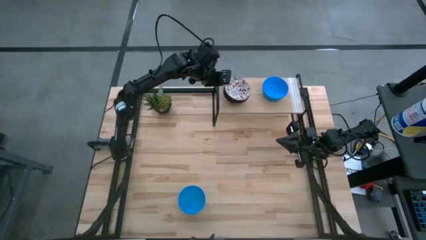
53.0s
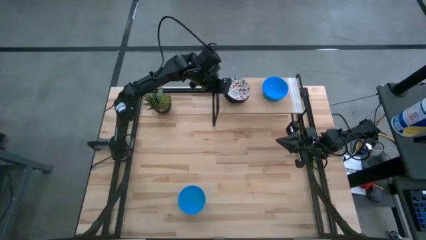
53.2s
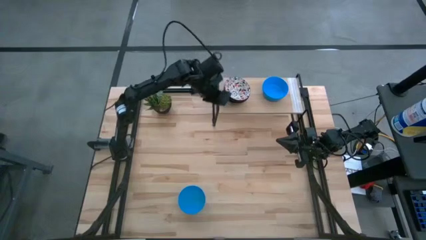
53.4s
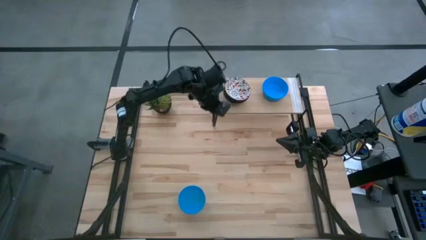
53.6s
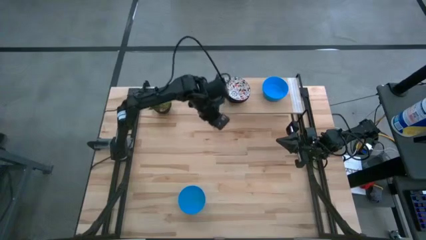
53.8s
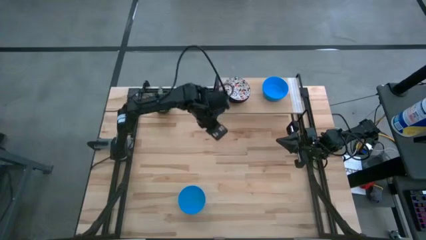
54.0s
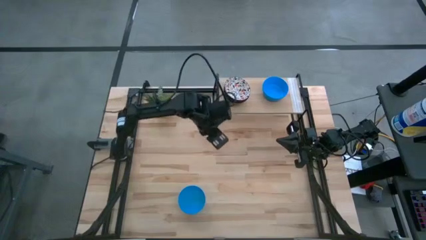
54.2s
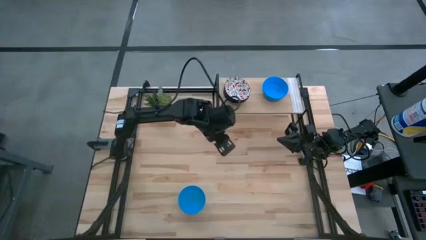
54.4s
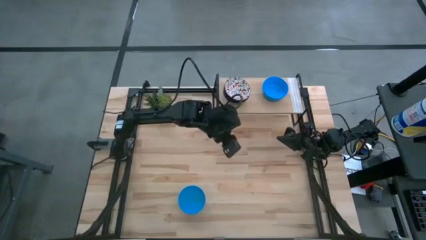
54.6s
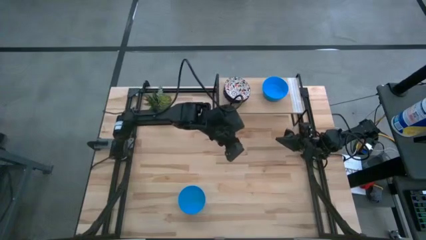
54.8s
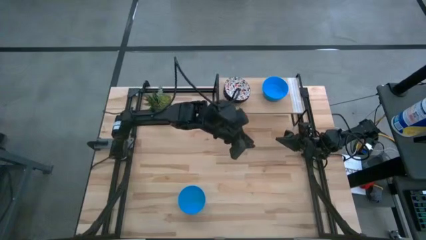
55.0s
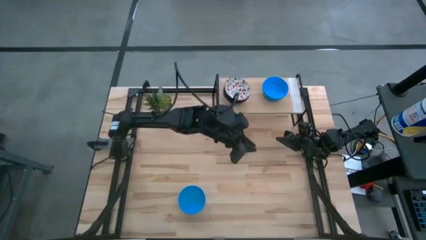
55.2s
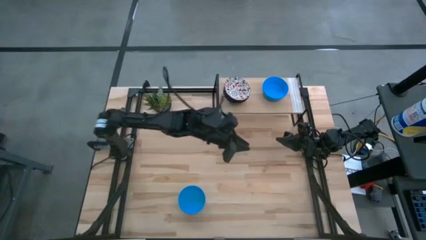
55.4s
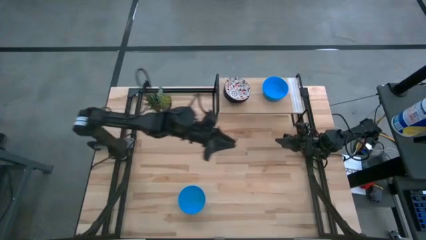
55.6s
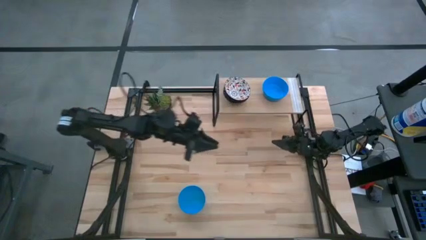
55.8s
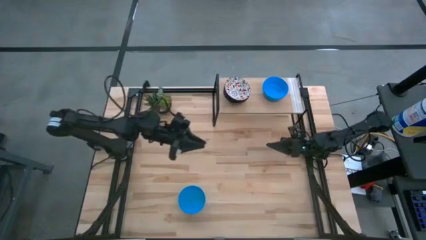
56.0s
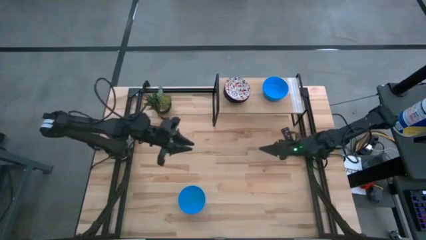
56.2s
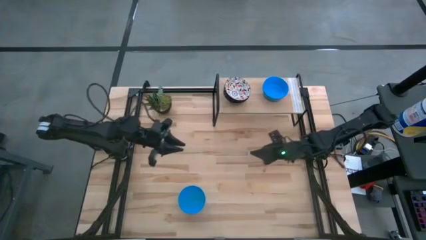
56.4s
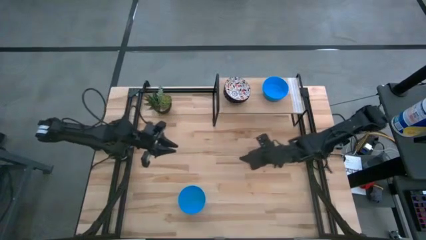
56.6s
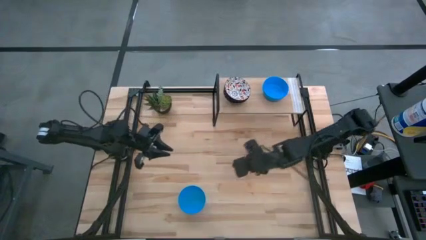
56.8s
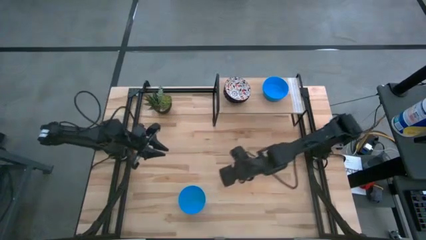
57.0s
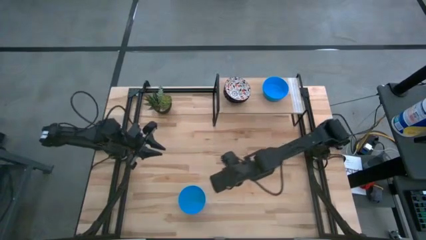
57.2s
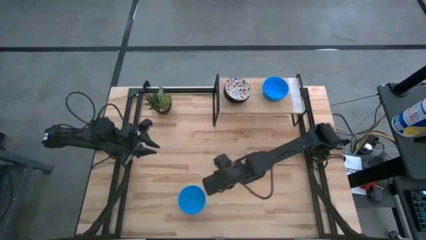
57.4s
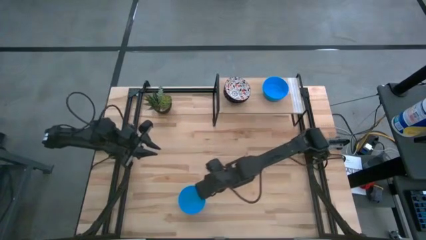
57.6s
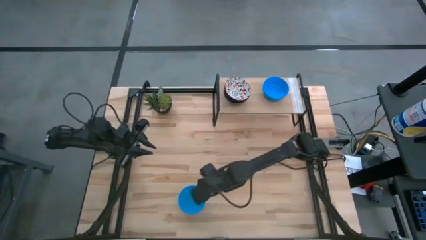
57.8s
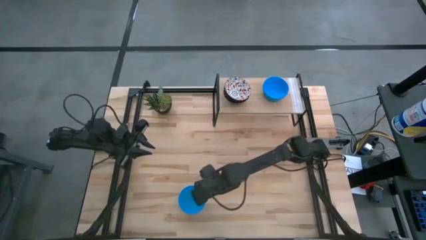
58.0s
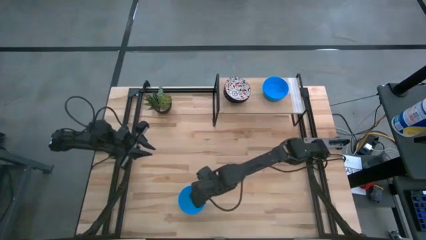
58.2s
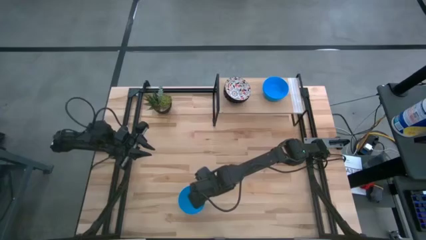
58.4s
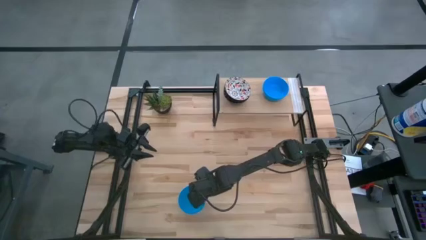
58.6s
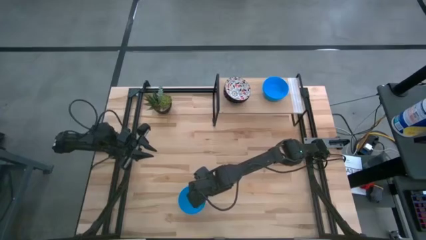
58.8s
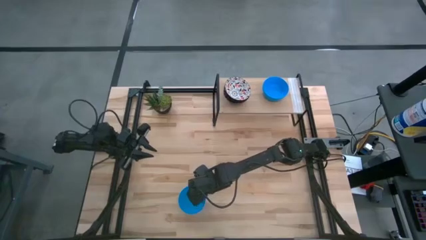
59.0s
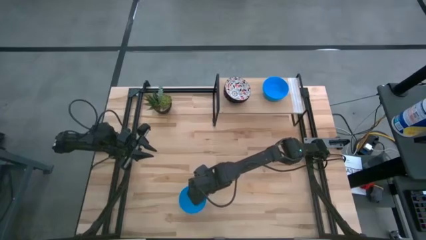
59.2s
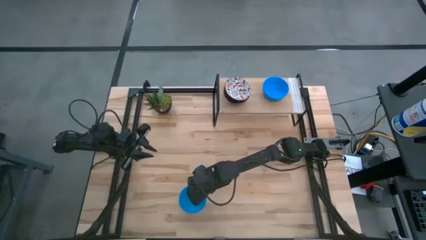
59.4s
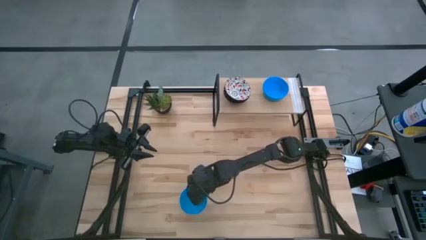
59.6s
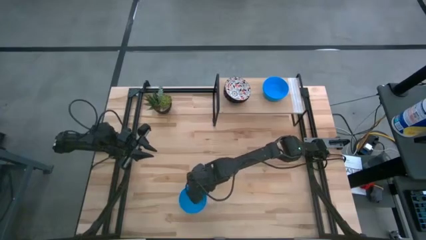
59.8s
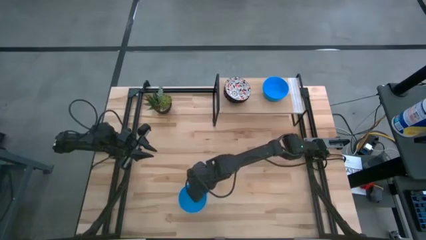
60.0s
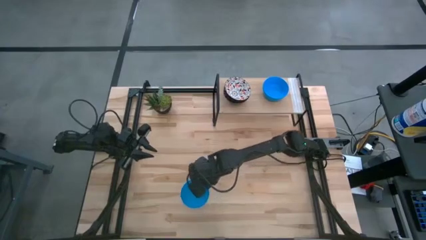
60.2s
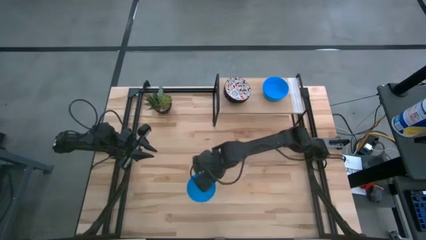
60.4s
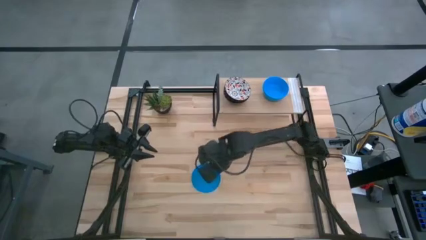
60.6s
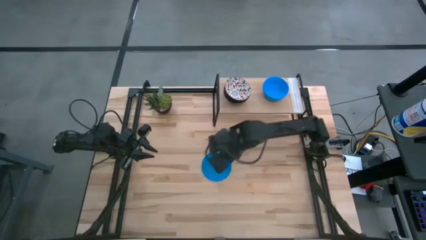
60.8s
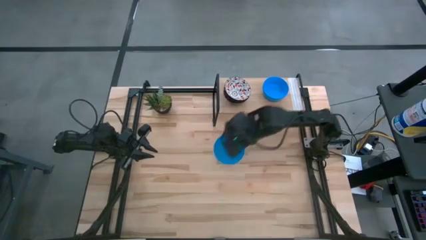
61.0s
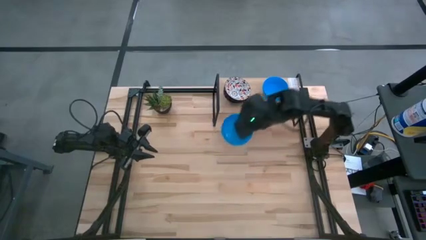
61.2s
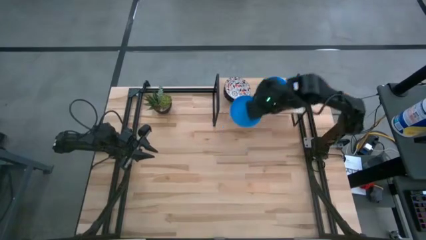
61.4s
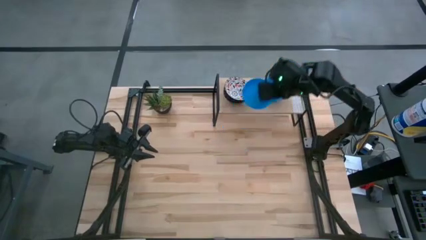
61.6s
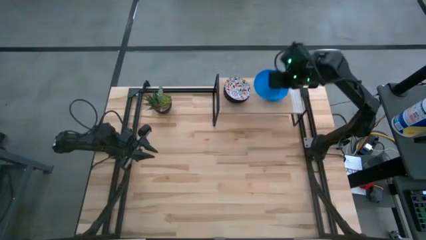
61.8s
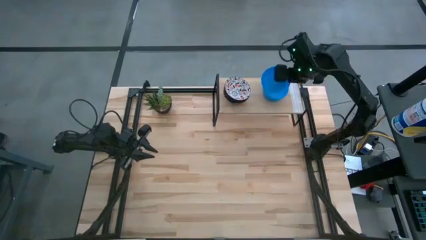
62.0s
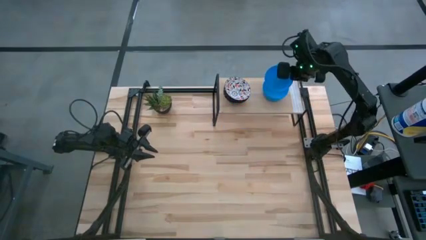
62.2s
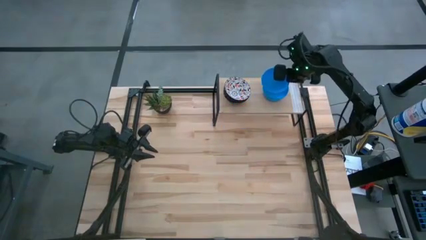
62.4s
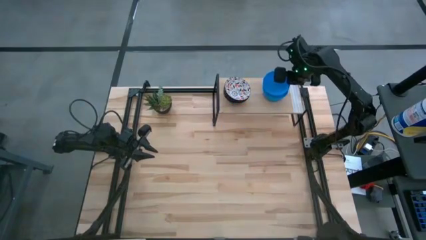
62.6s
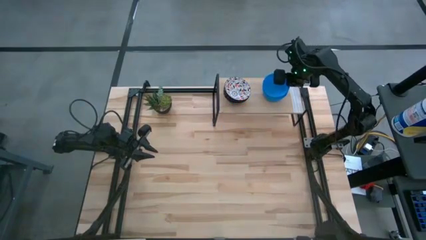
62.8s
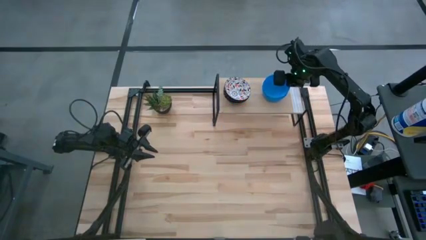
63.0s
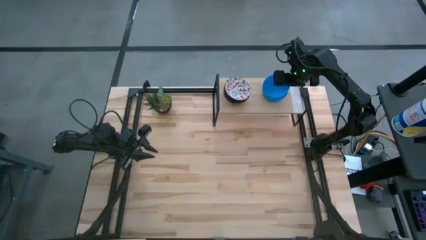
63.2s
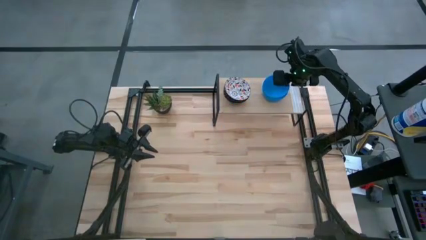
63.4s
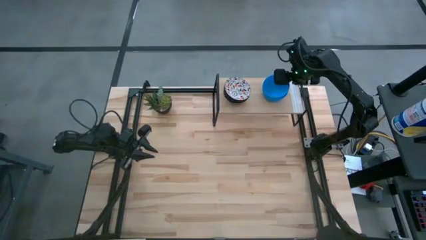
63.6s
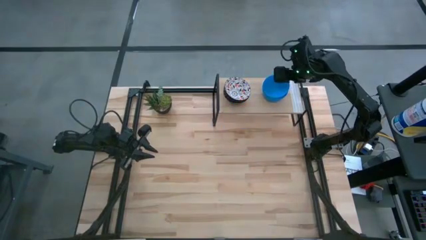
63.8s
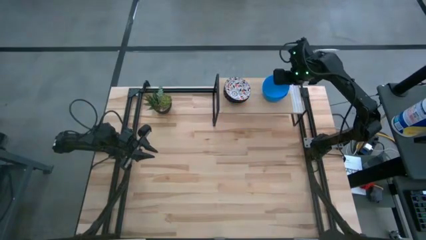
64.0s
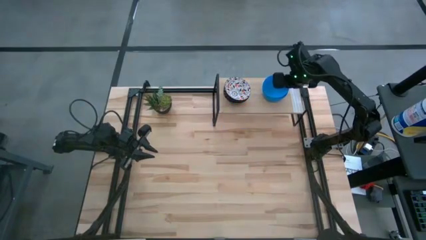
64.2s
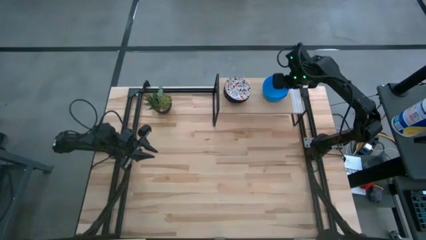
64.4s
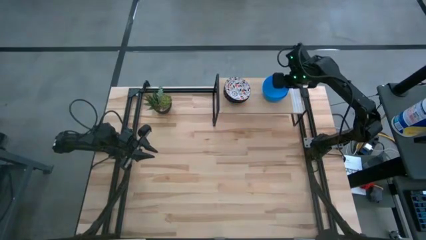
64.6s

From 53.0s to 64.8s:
Task: Pick & Place Mini bowls
Stack the blue bowl on the top of the blue bowl on the shelf

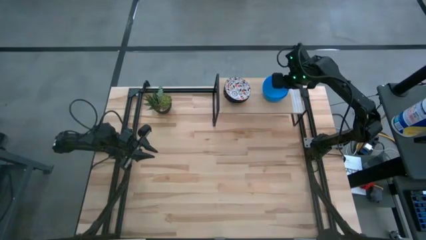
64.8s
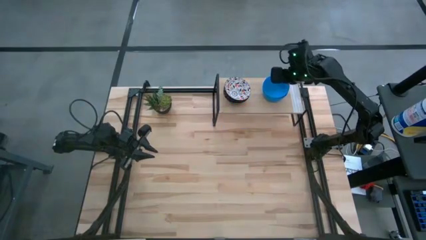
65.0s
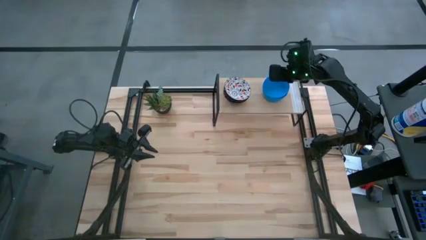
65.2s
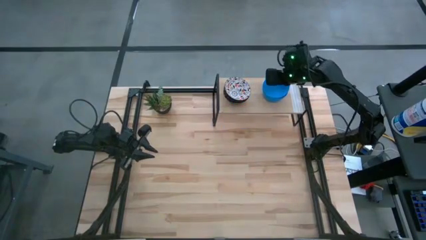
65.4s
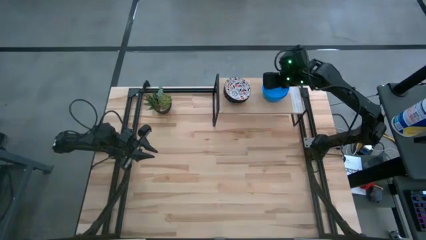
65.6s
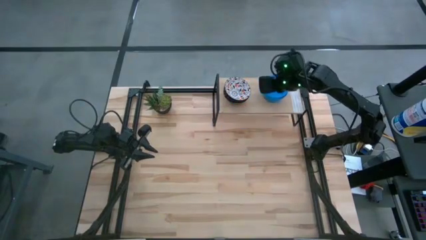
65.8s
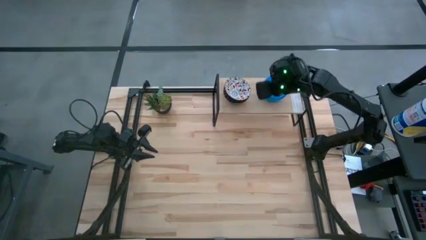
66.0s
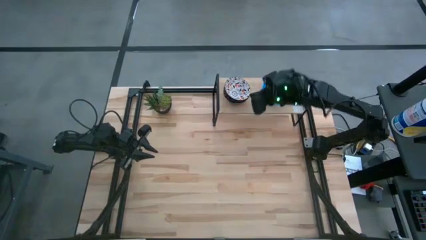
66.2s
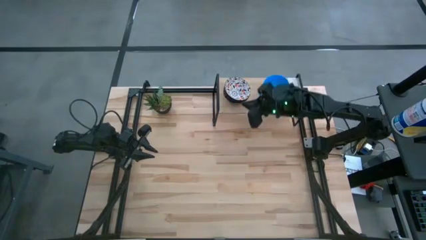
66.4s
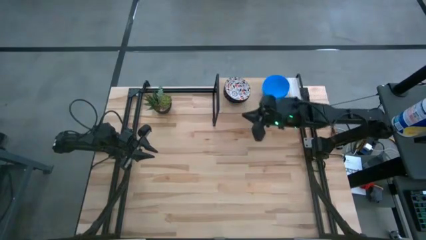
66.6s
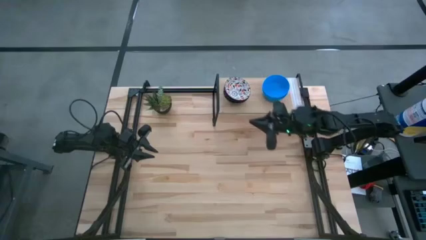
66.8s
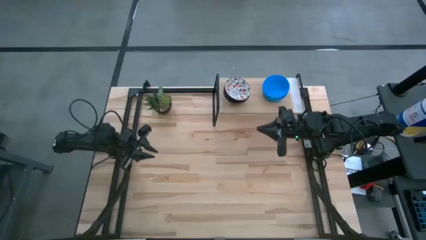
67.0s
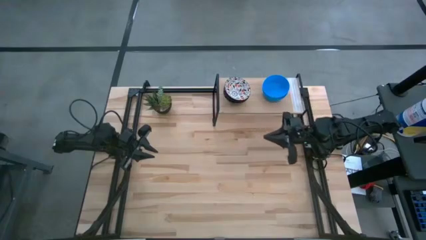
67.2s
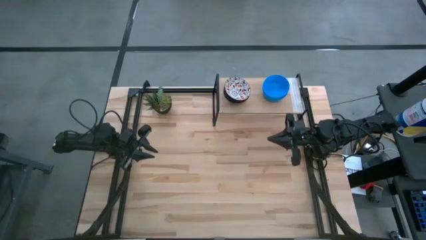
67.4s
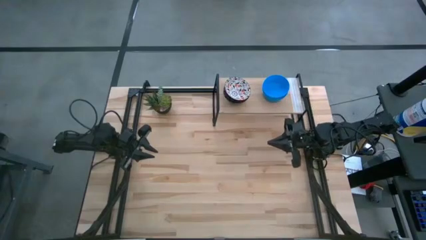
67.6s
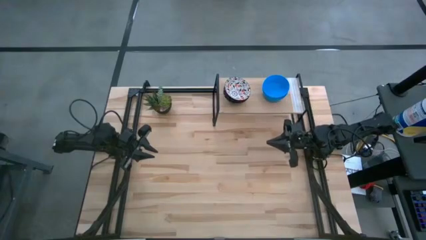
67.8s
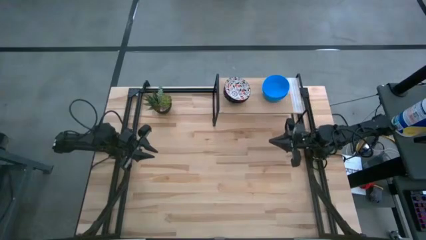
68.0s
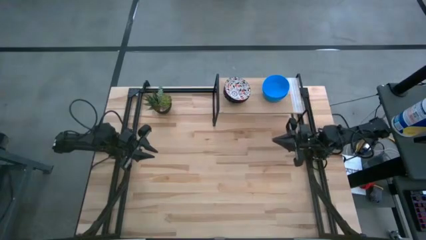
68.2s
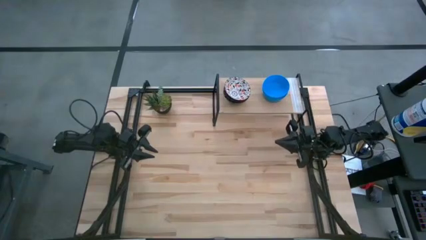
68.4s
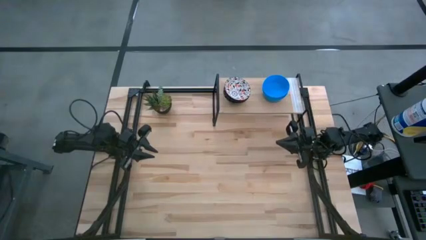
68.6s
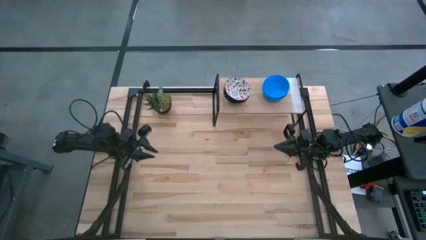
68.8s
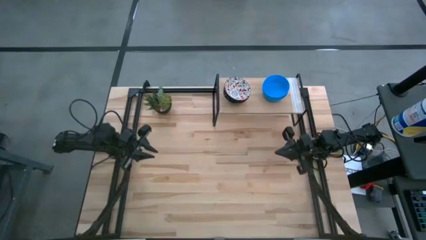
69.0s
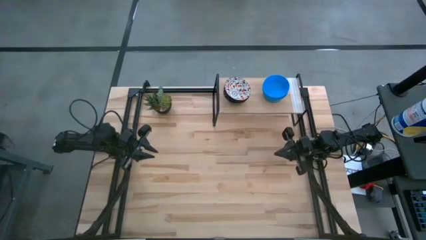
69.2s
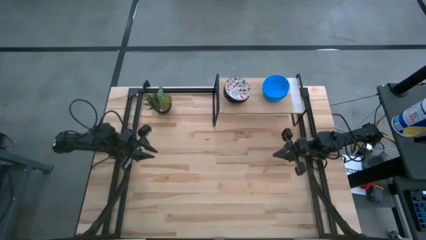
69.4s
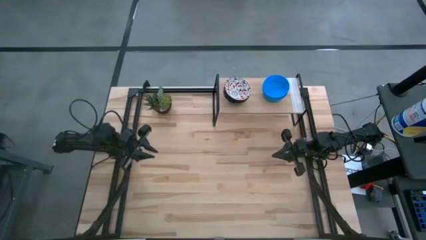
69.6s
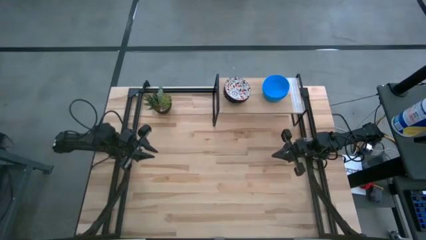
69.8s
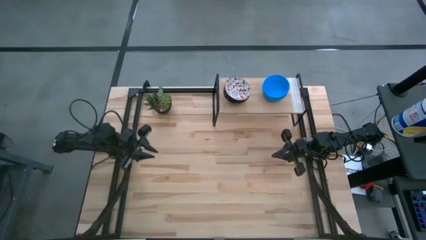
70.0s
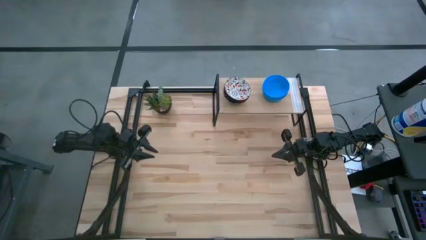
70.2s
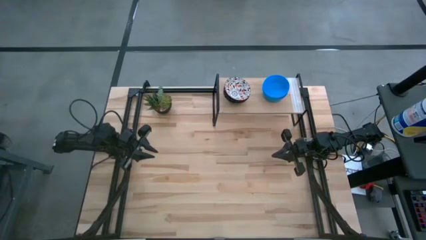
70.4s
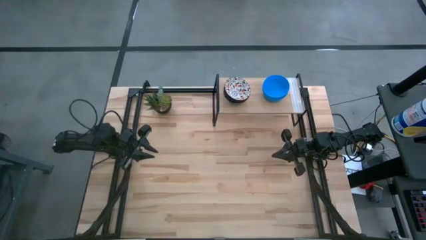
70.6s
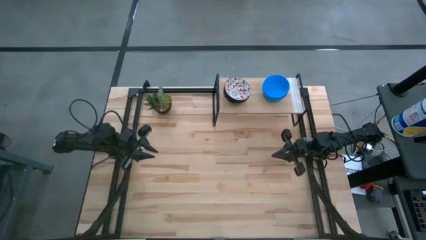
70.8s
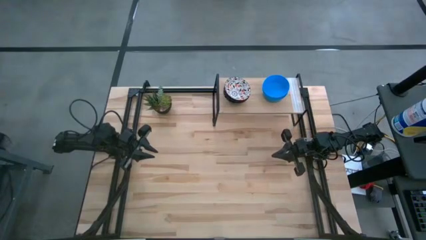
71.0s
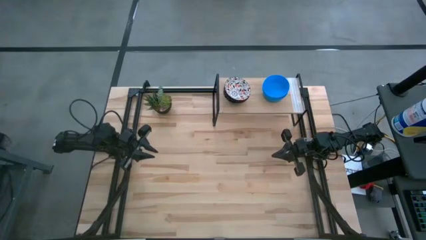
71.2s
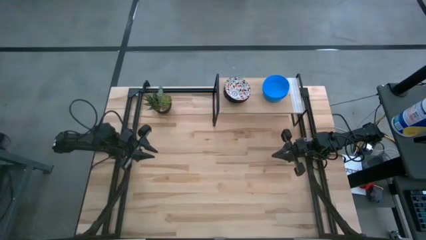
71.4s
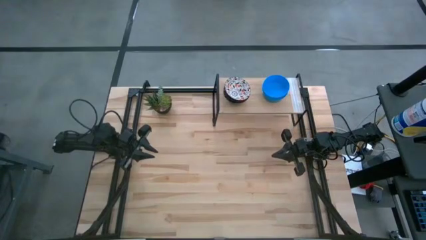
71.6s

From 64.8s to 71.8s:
Return to Home Position
